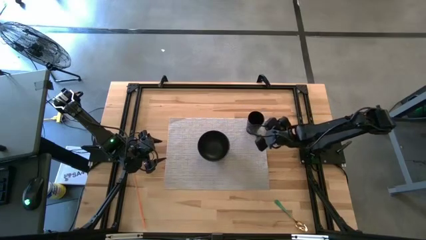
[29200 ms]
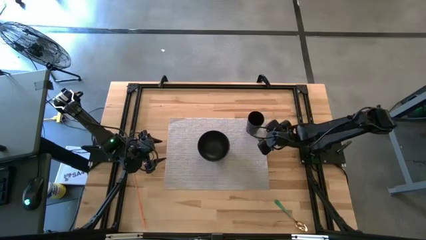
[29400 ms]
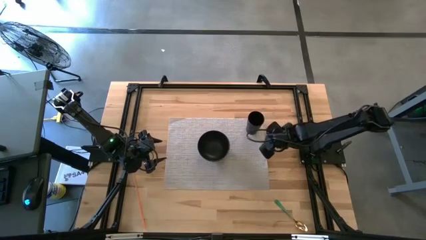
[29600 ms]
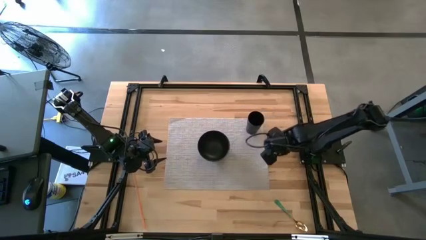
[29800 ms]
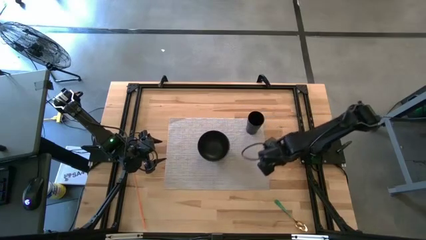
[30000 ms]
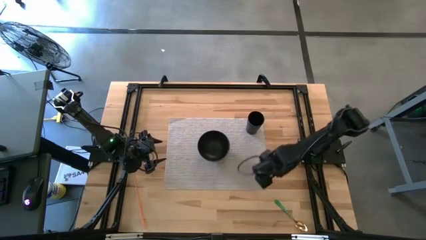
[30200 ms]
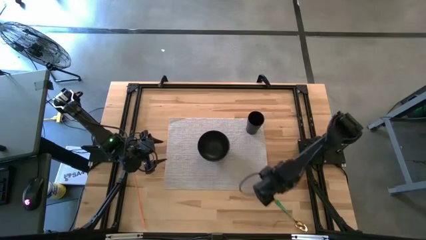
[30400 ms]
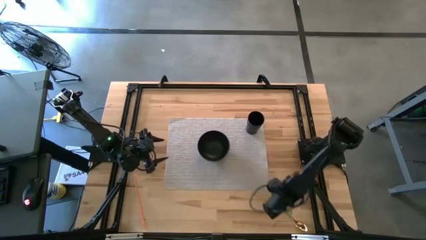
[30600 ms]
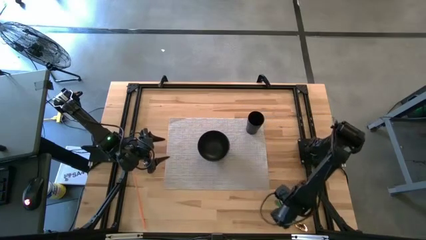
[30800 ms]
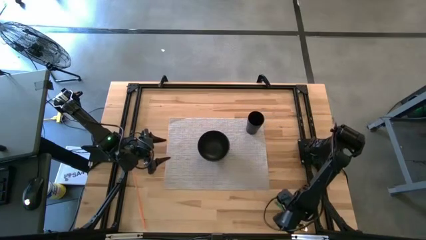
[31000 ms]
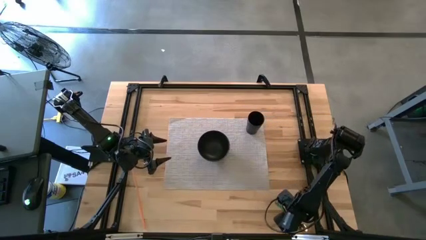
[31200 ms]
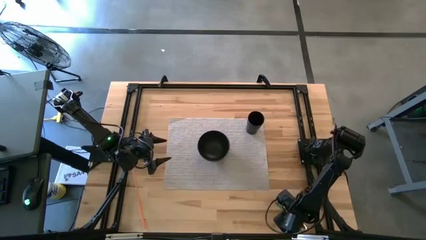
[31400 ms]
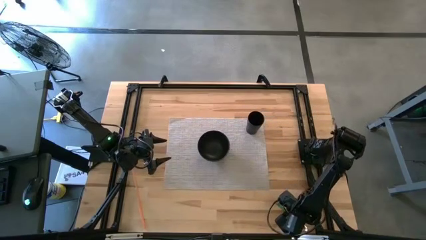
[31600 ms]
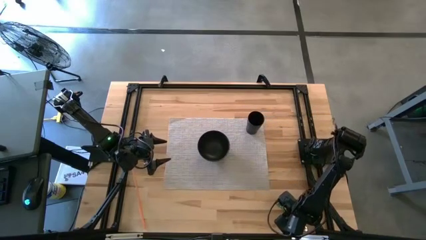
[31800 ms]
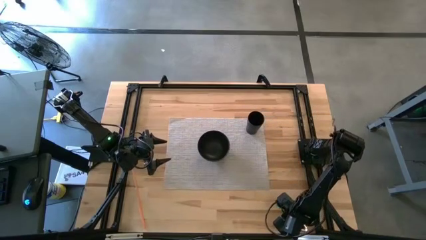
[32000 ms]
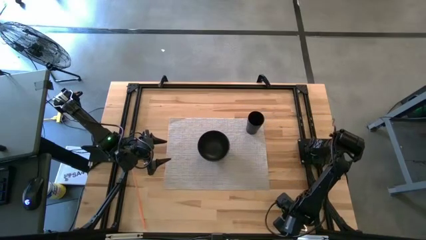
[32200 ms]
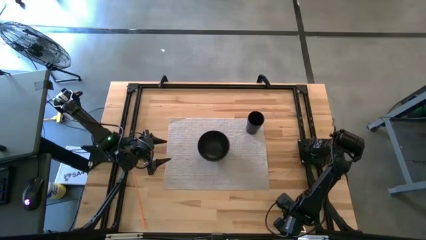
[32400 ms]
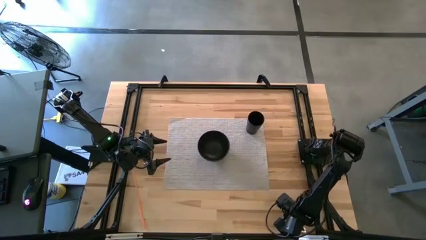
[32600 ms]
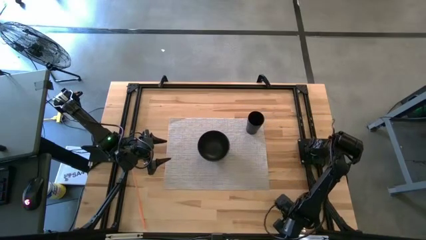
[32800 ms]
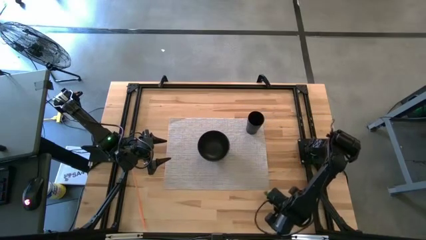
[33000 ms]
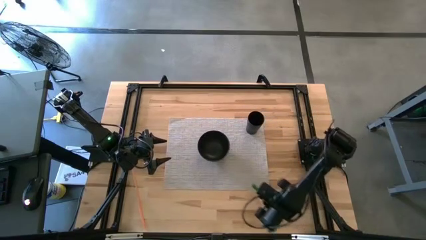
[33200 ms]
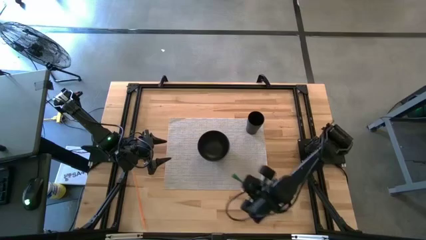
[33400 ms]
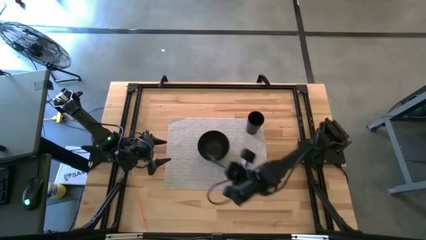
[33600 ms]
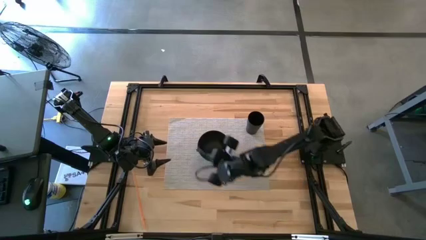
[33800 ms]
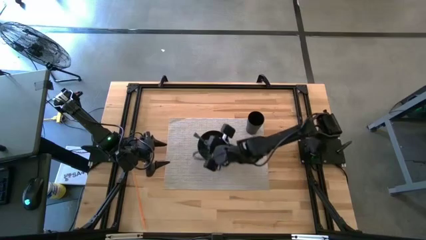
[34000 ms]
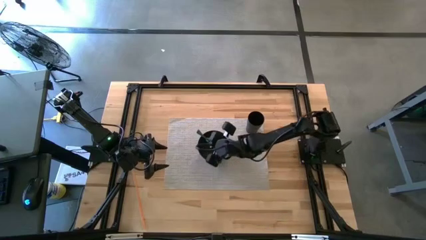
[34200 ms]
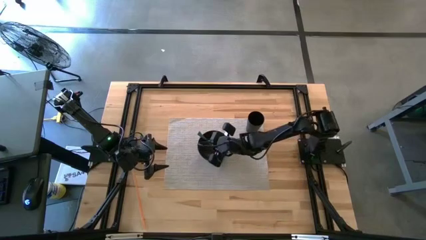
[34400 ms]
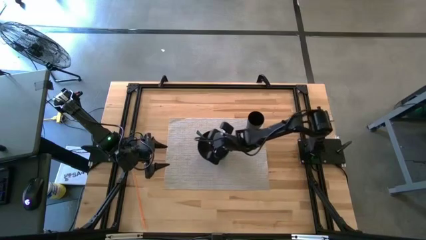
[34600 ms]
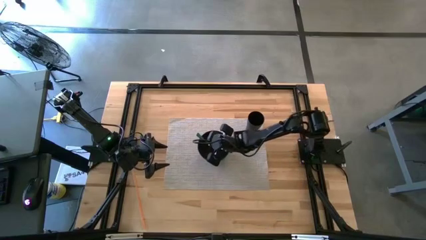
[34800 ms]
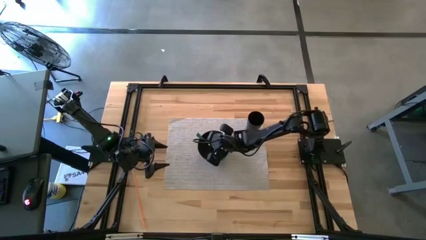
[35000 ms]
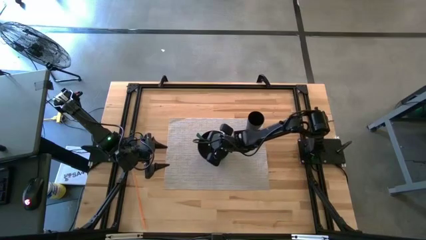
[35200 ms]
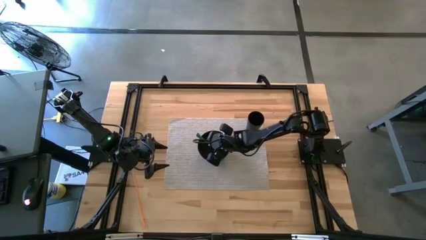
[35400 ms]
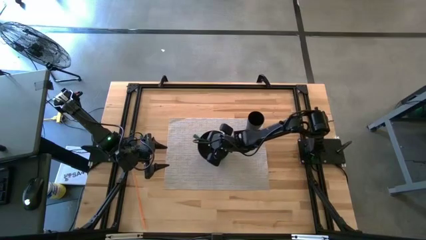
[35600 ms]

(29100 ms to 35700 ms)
Task: Pick & Place Utensil
Put the green spoon into the black bowl on the gray mat

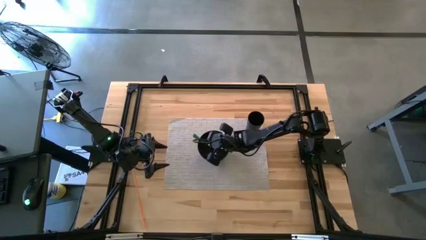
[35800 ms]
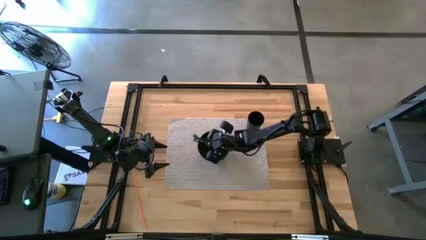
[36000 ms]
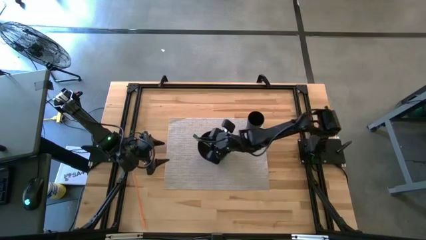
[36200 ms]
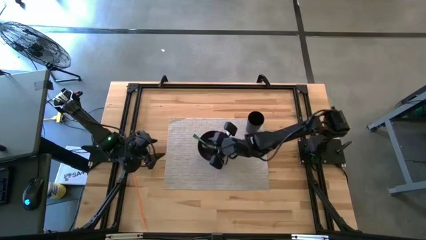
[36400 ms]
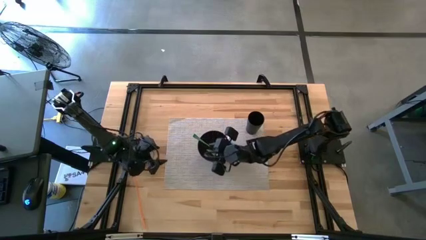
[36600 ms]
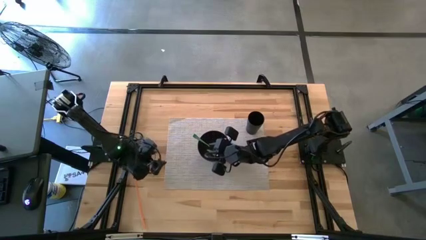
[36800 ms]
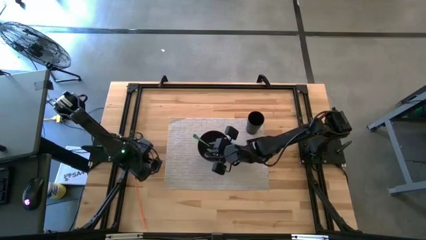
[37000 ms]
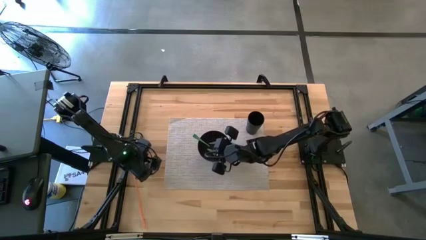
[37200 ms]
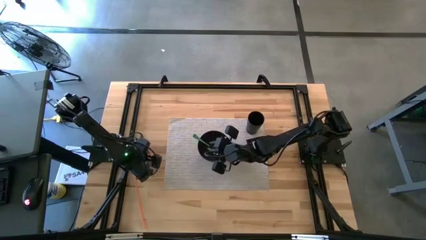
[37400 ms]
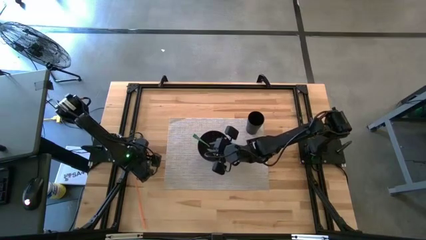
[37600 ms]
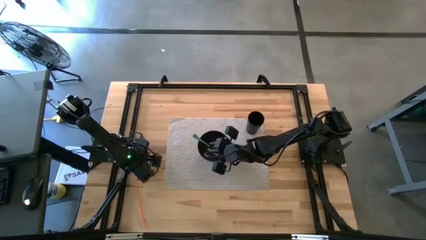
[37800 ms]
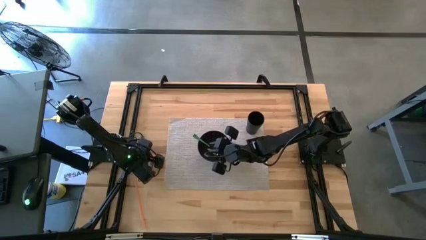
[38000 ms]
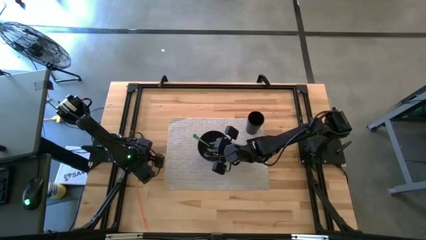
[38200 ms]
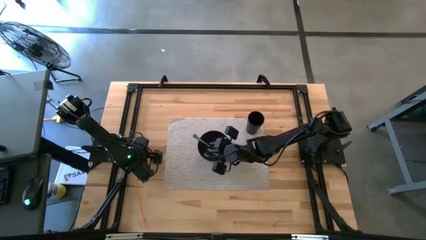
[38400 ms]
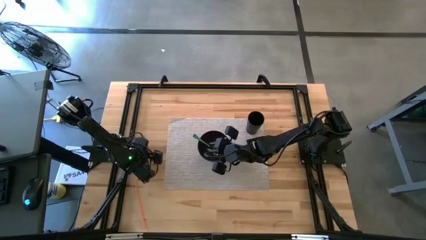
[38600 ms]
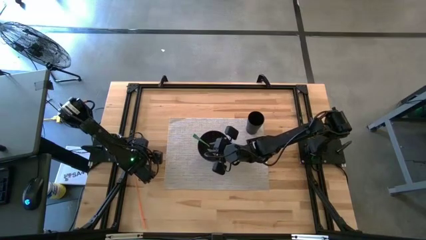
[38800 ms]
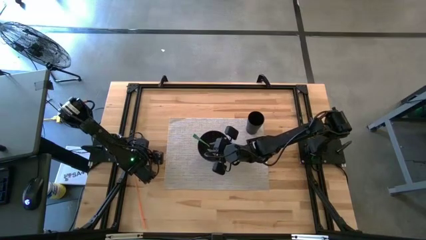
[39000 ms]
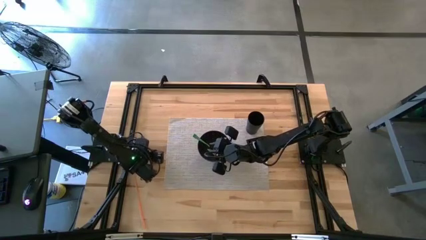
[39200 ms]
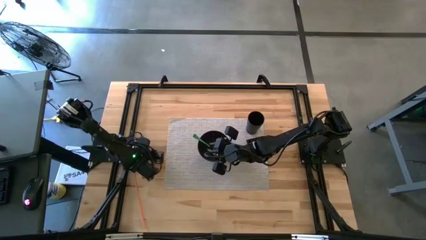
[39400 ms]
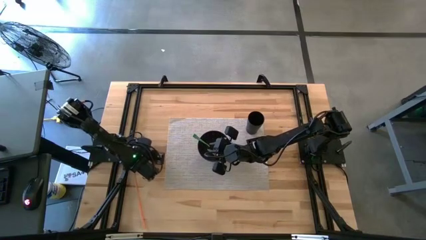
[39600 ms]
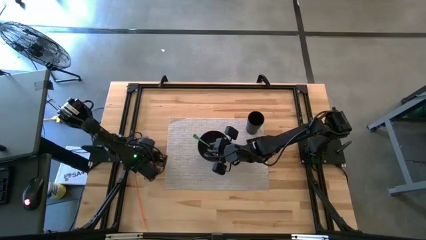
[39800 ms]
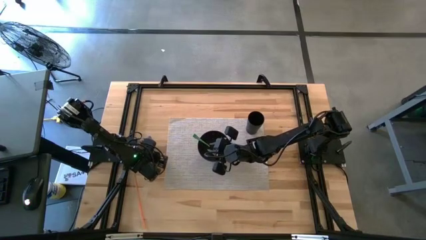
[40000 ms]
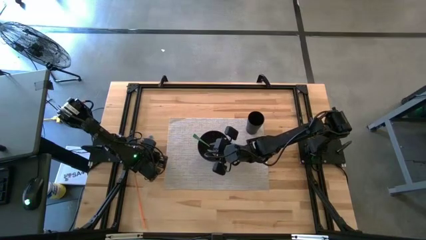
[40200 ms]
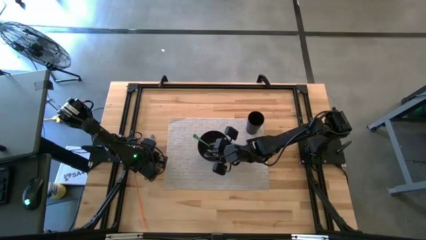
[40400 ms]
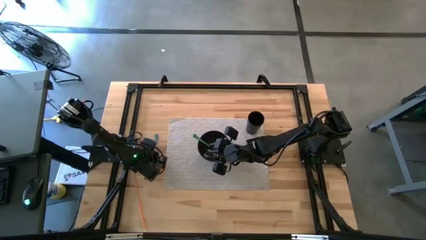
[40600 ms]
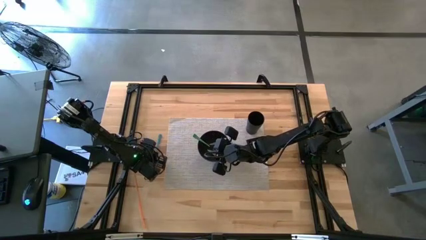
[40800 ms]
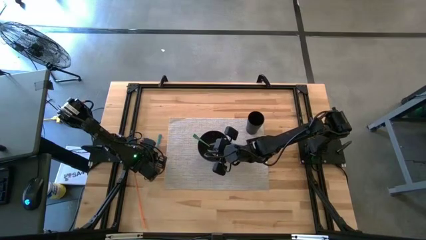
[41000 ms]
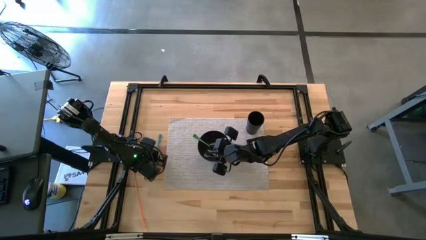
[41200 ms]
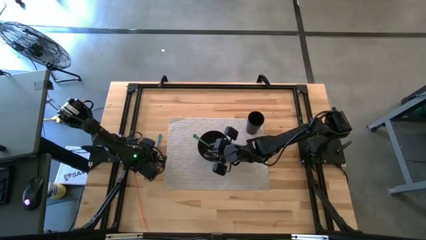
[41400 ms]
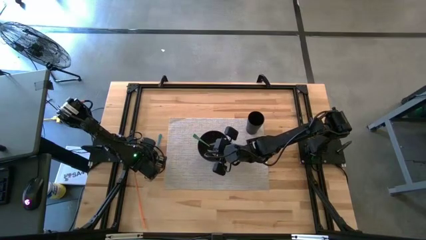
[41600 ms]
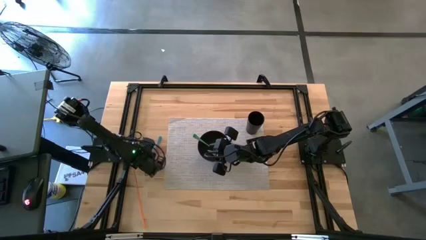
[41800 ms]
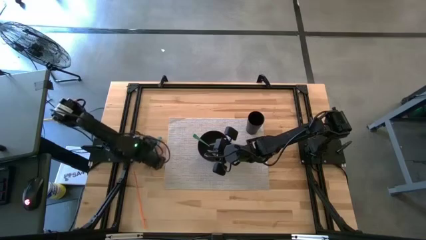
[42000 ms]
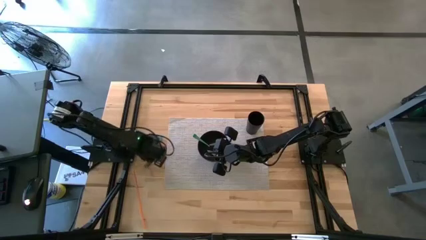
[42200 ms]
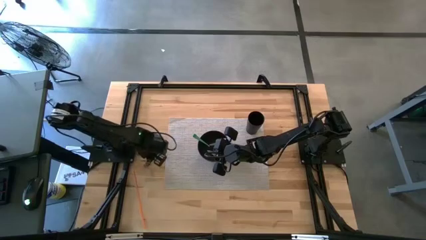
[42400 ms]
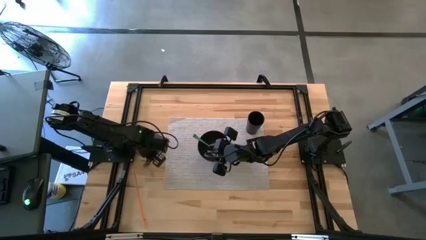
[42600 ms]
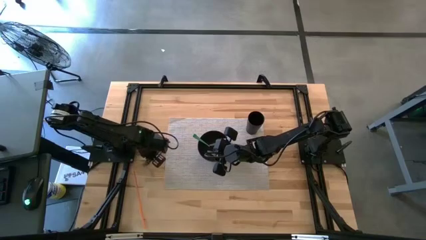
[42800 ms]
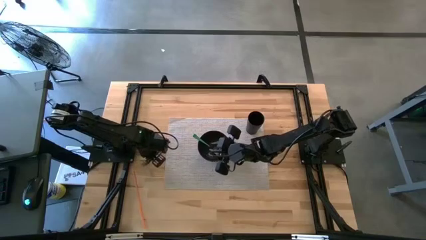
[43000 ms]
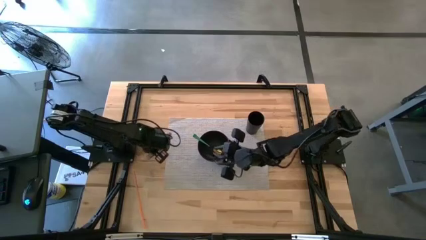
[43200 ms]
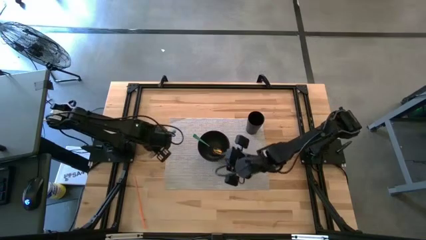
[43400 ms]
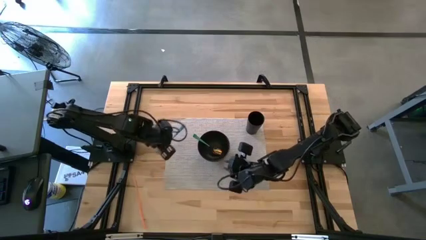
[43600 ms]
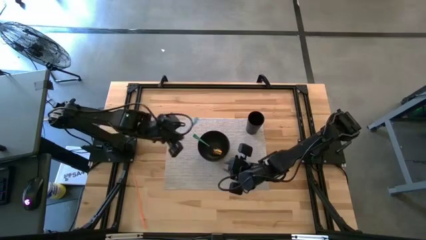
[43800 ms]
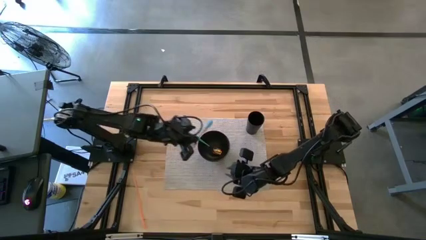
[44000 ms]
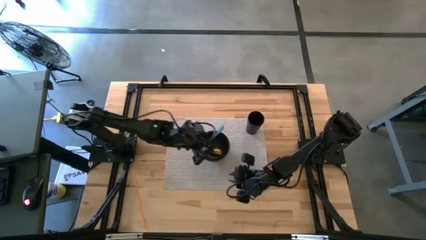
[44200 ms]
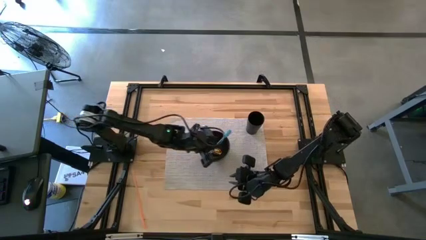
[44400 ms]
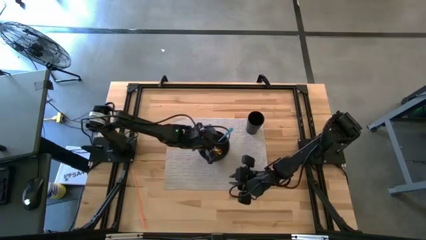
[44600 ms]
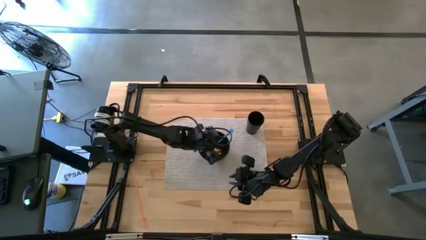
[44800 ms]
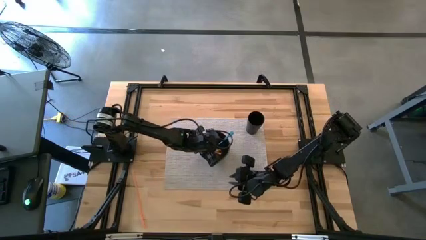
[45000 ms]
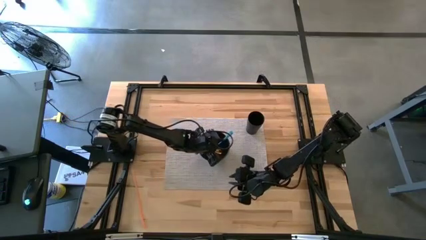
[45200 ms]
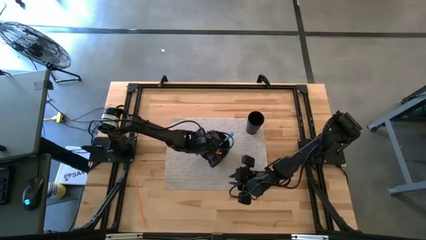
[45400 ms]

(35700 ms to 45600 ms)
Put the blue fork into the black bowl on the gray mat
